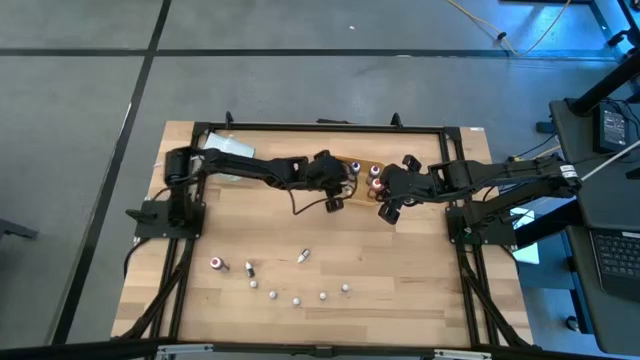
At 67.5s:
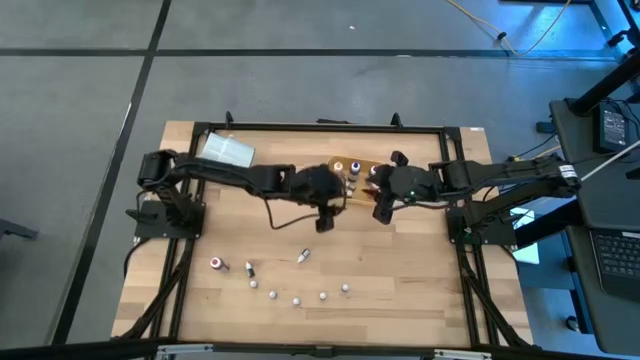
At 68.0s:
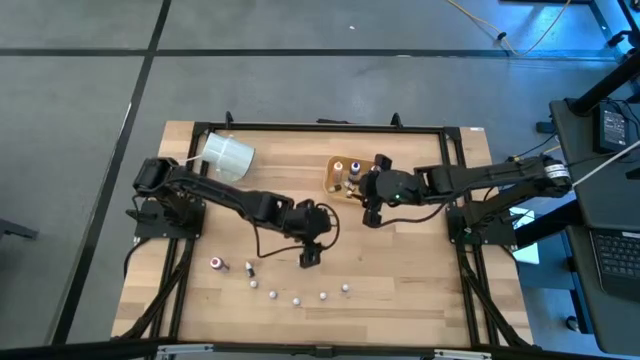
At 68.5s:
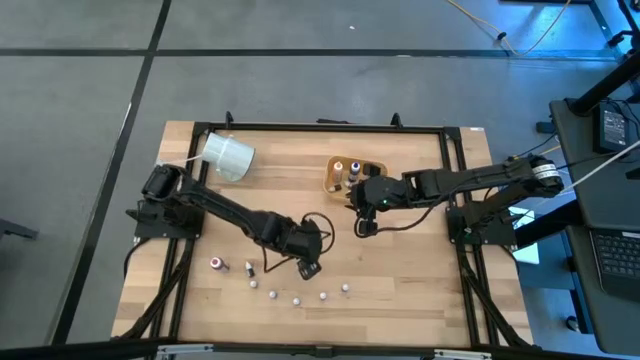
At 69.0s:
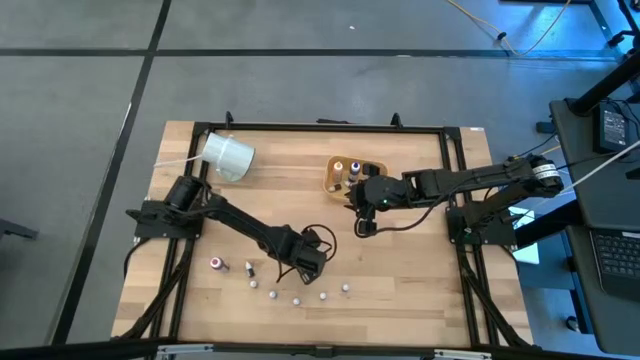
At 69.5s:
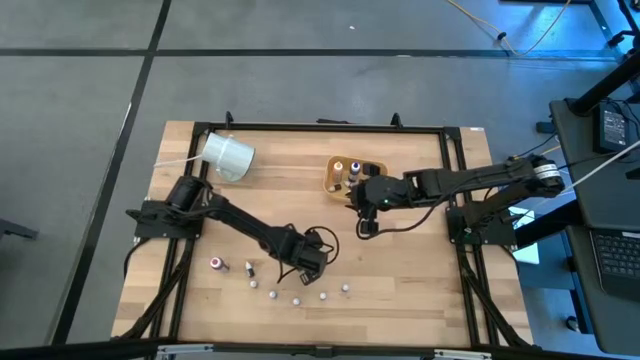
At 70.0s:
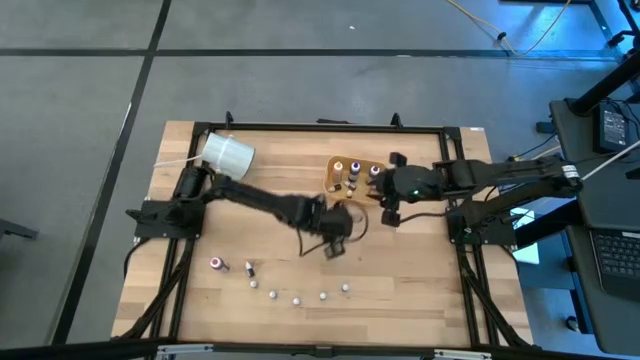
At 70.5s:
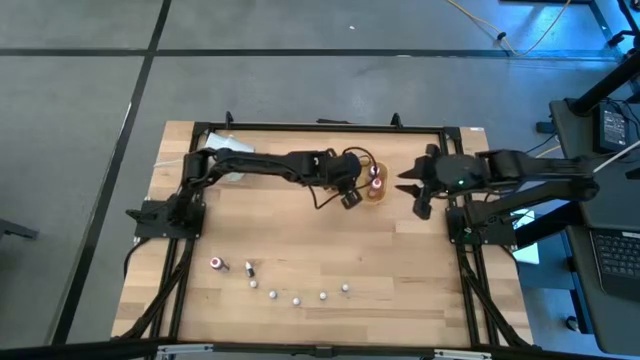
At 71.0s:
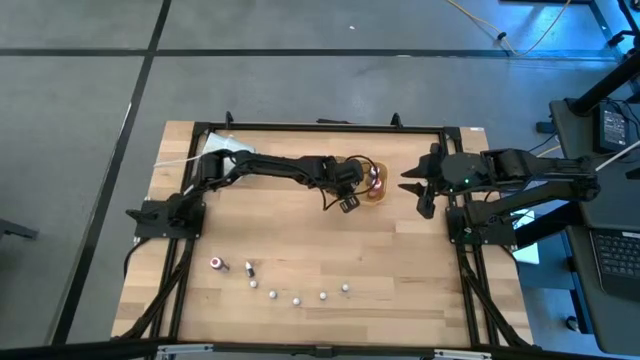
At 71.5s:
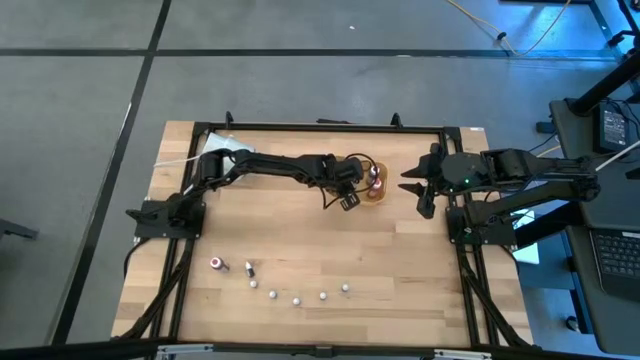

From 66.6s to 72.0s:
Task: Pick & Place food coloring
Put the small black food coloring bottle into the yellow bin

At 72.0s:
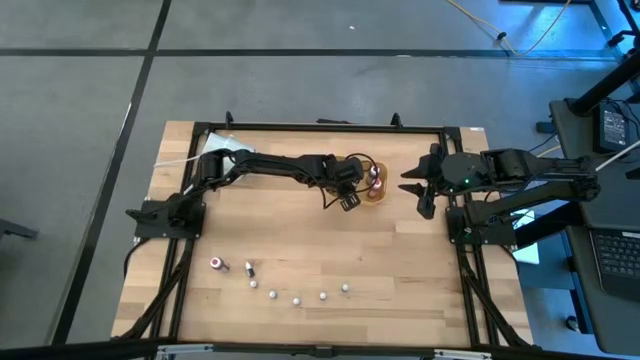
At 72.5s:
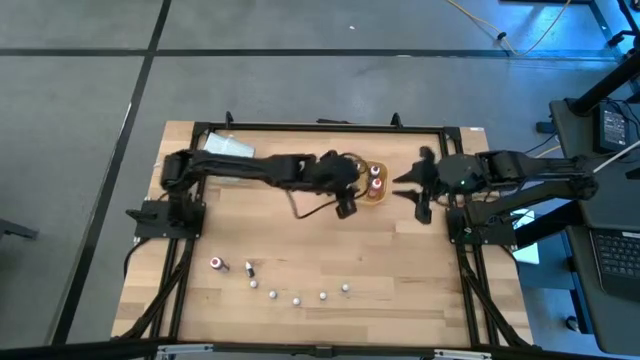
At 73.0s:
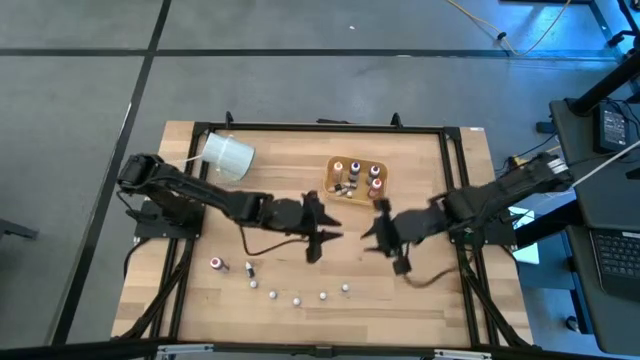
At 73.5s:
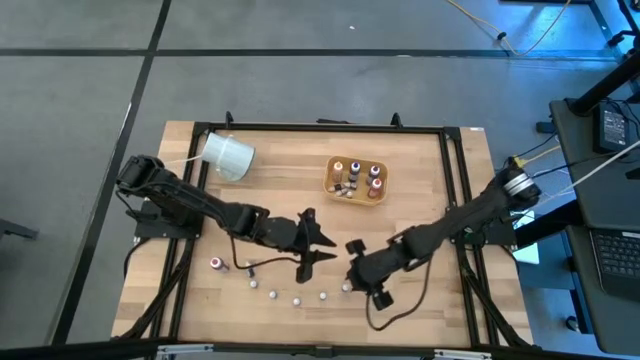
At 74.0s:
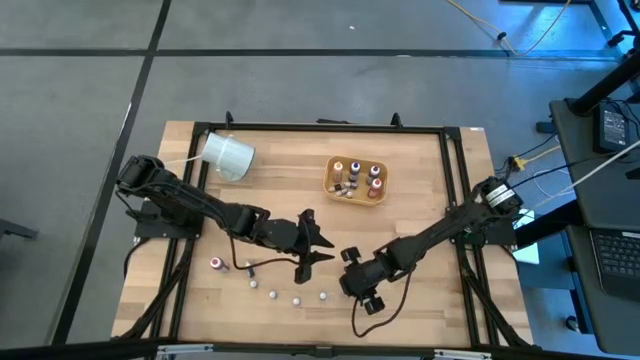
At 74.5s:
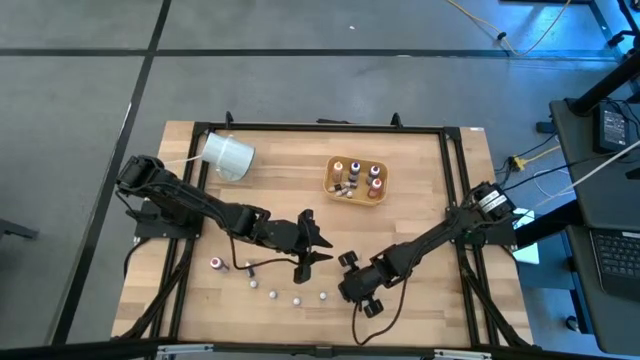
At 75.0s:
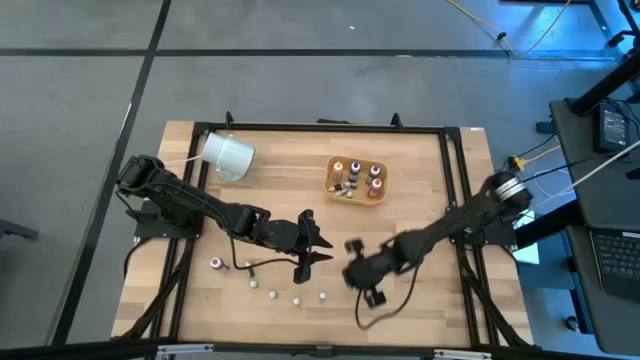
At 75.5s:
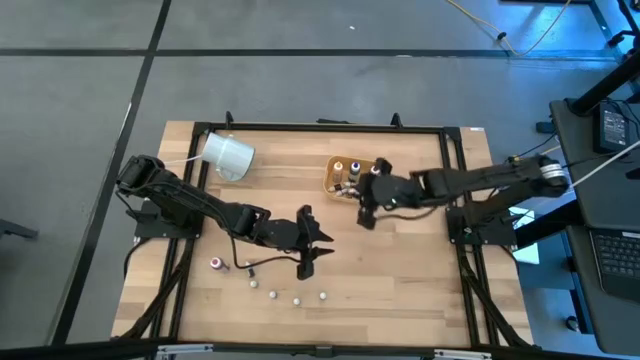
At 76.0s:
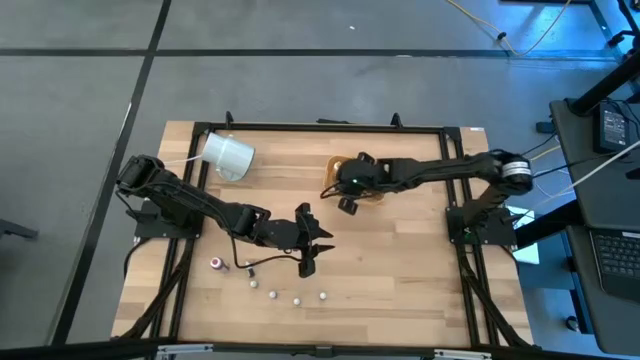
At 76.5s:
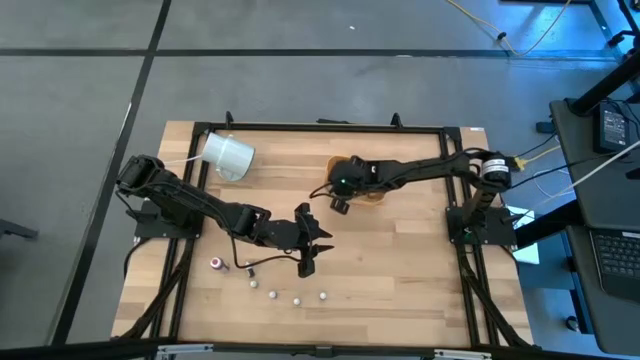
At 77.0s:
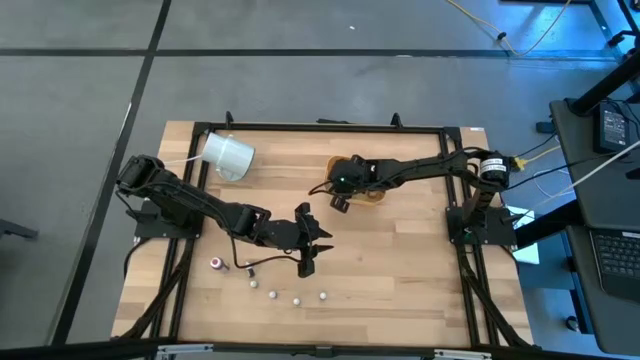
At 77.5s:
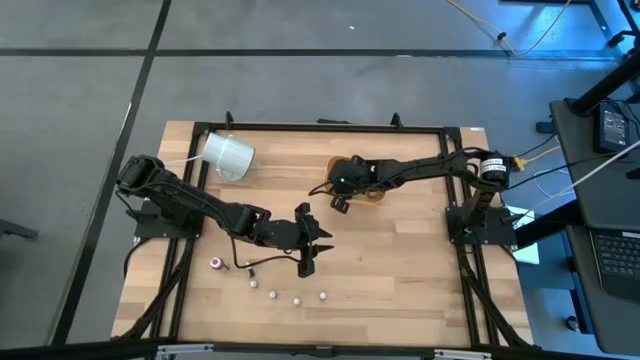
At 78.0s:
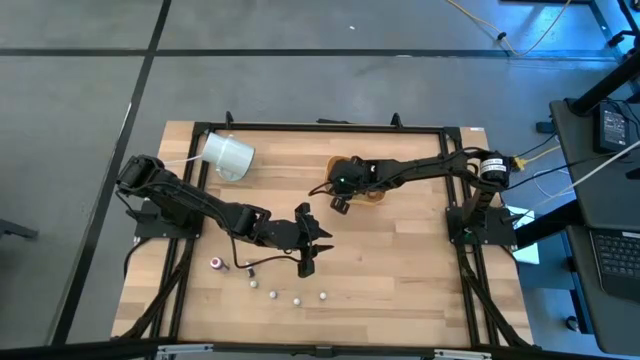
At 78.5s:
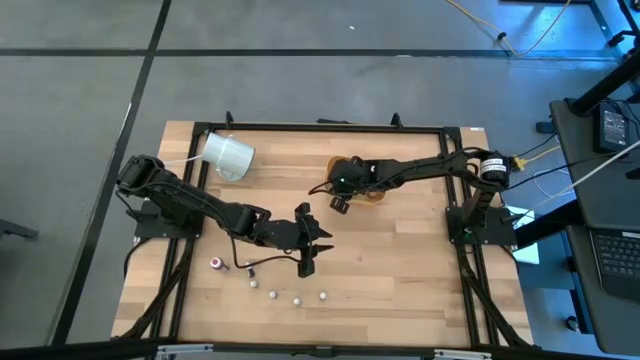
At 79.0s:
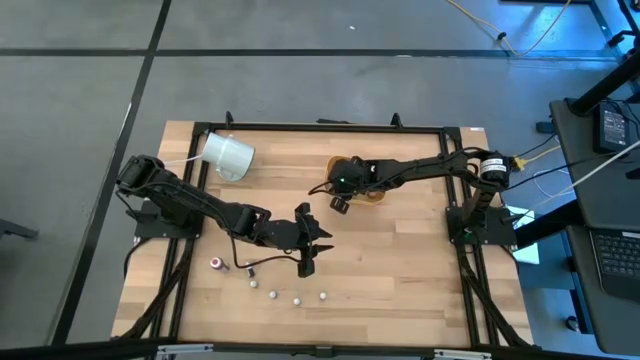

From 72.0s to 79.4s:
Put the small blue food coloring bottle into the yellow bin

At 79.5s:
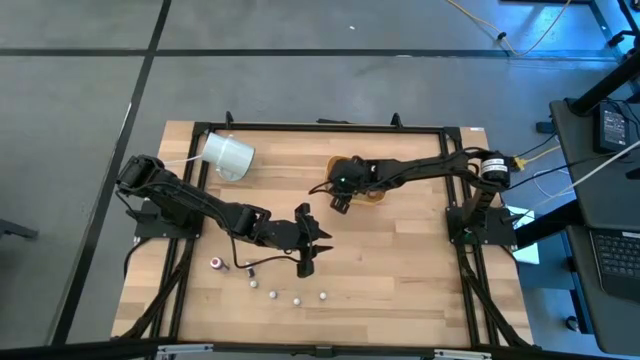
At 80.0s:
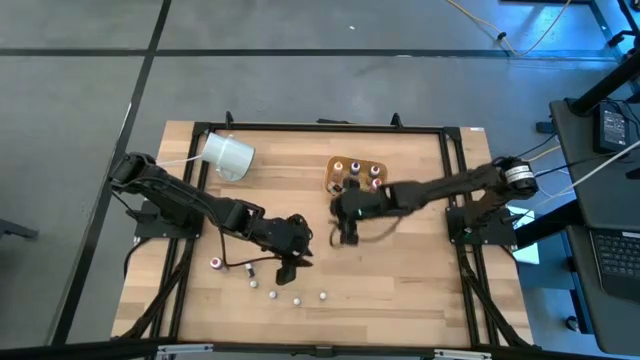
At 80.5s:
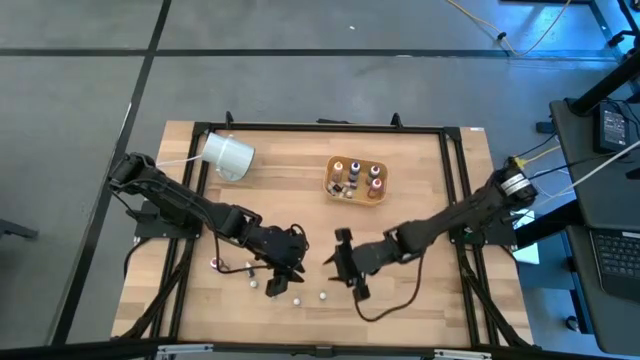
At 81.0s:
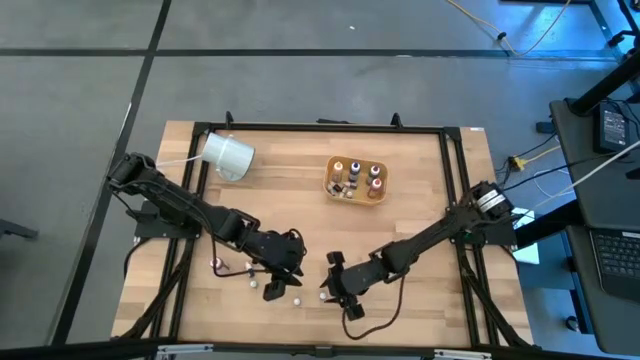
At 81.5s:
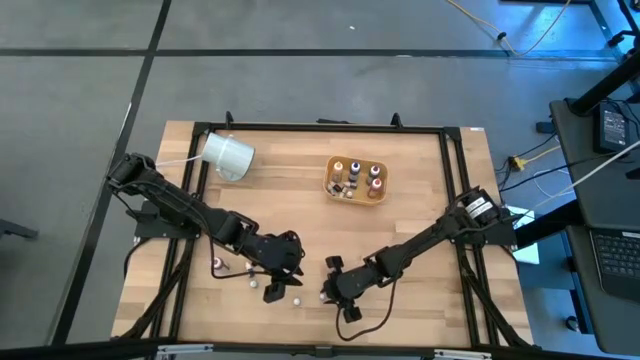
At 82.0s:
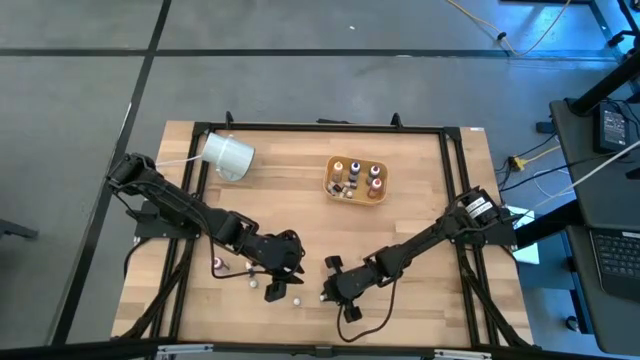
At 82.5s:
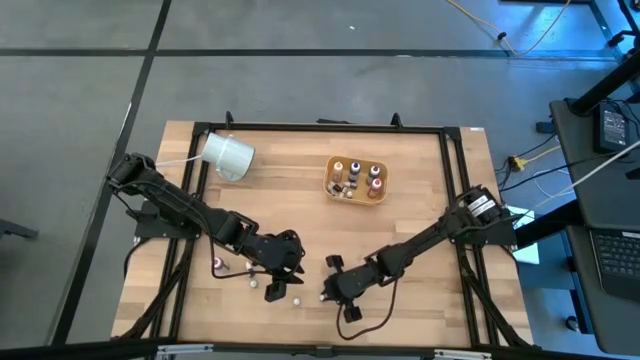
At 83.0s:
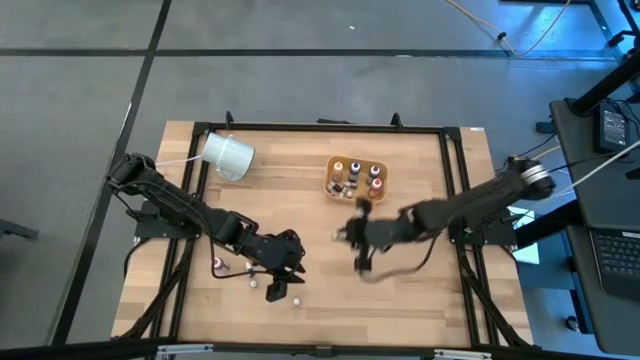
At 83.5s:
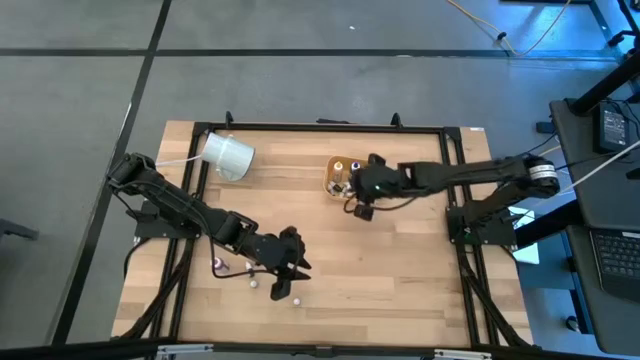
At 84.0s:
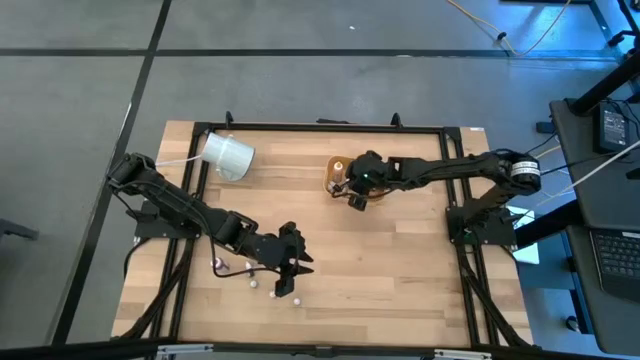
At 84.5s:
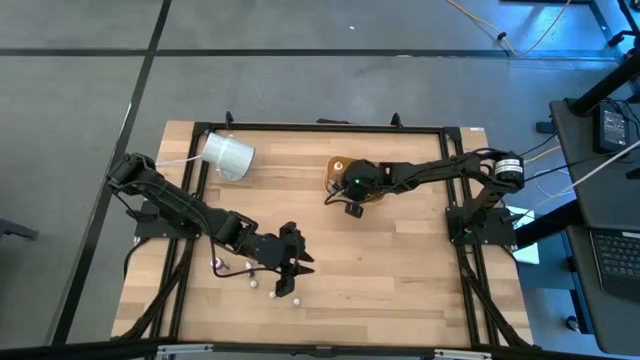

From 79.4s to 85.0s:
Put the small orange food coloring bottle into the yellow bin

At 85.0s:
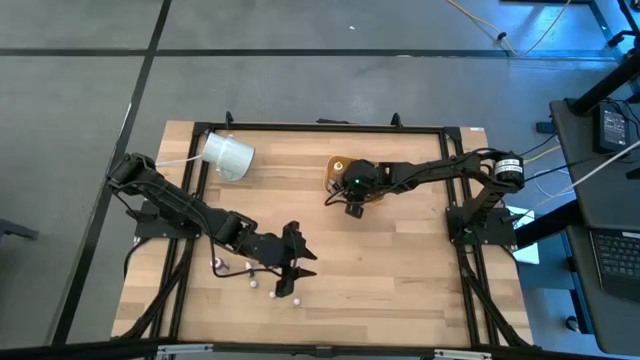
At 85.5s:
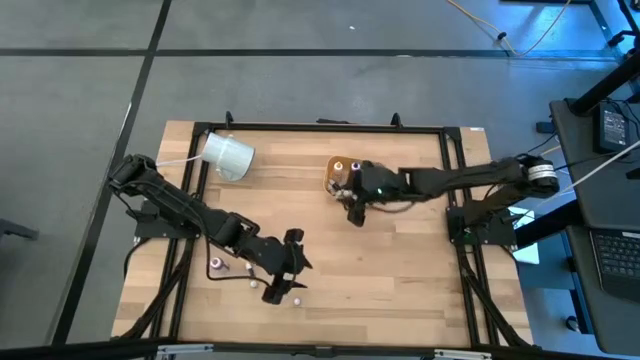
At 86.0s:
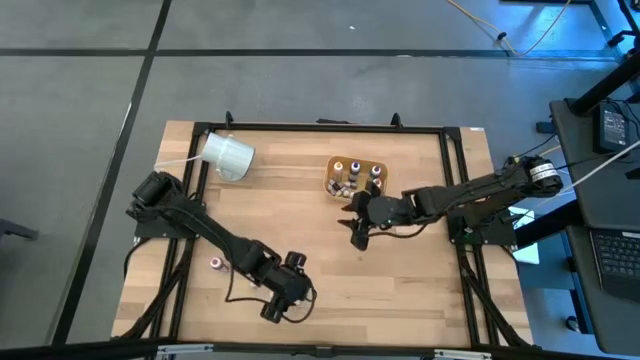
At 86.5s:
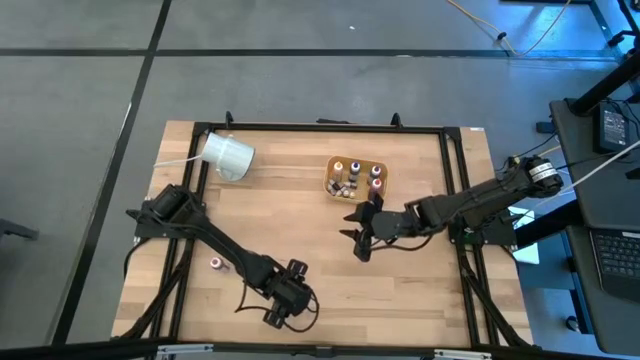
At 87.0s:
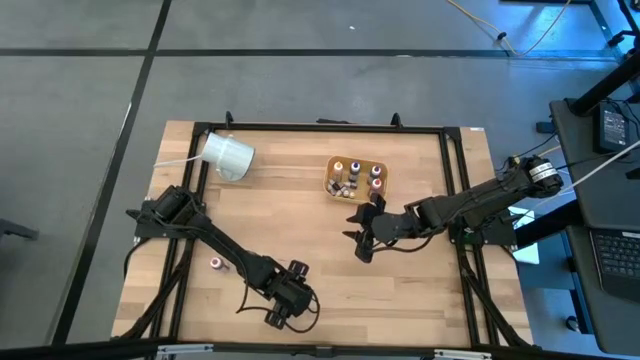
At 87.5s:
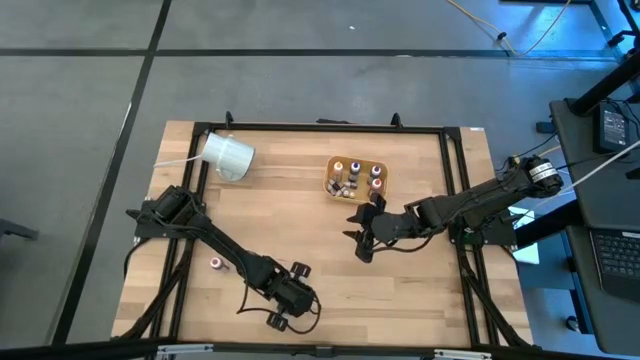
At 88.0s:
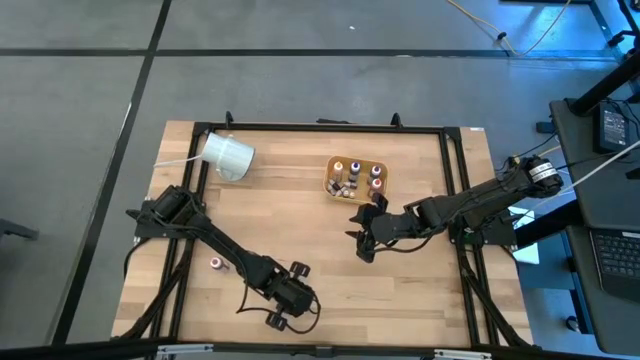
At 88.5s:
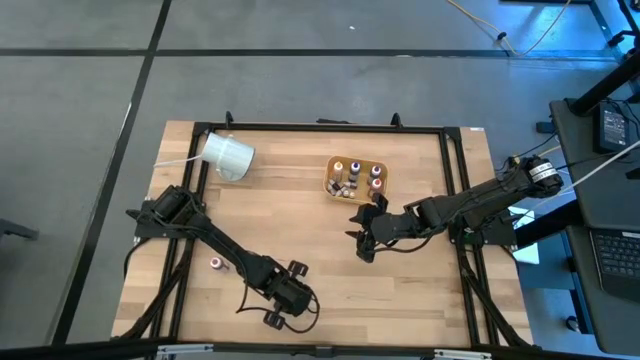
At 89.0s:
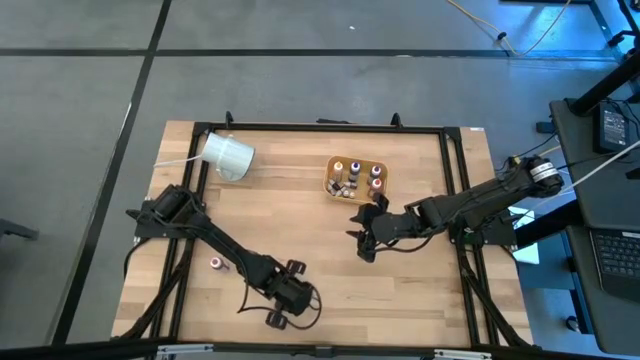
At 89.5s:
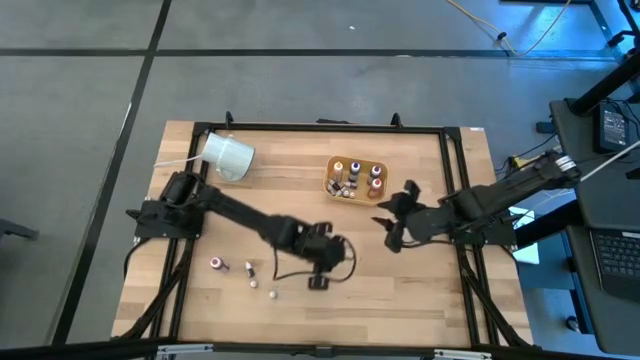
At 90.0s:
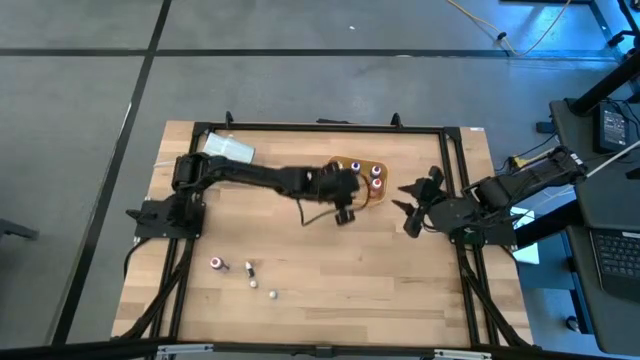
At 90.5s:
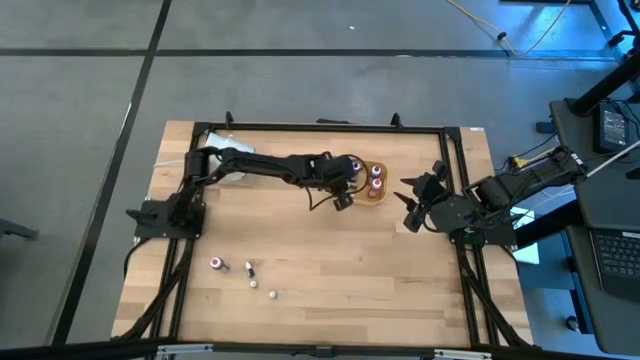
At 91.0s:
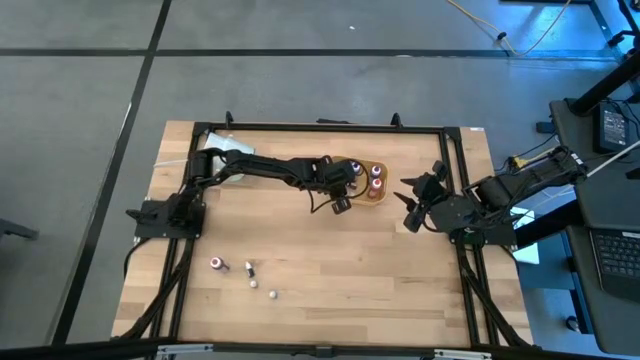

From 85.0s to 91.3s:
Put the small pink food coloring bottle into the yellow bin
